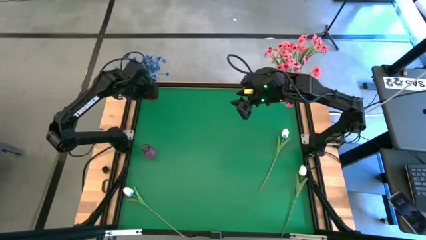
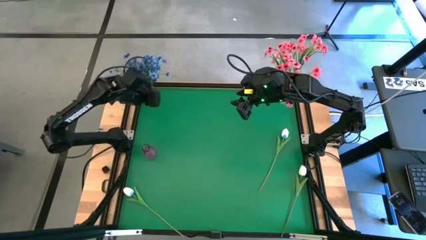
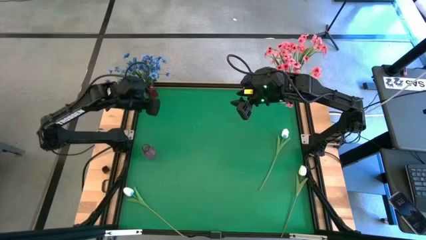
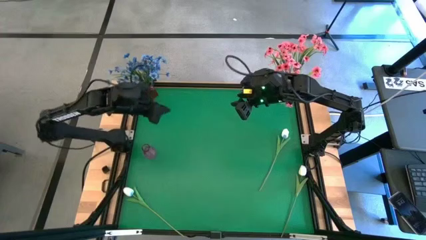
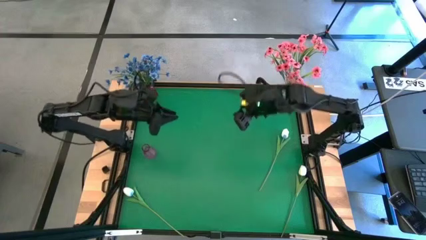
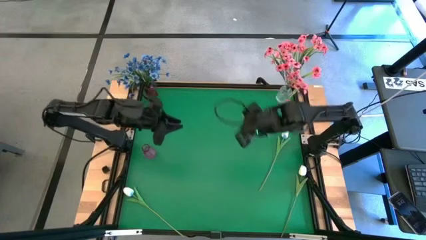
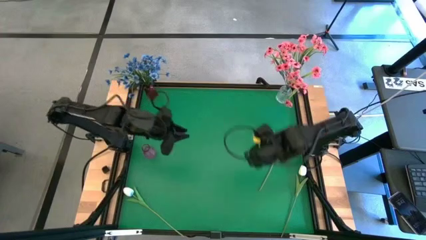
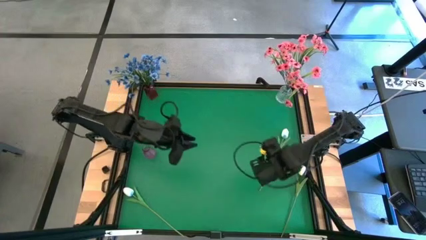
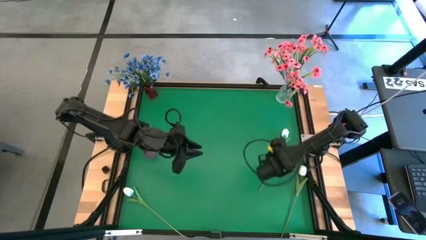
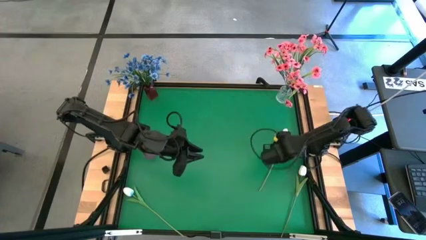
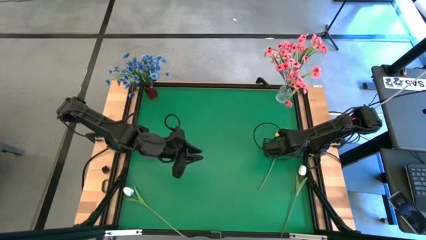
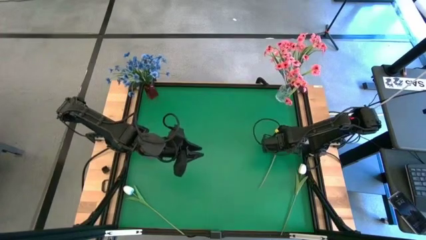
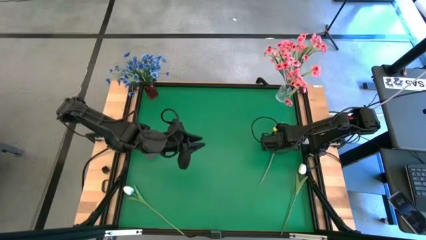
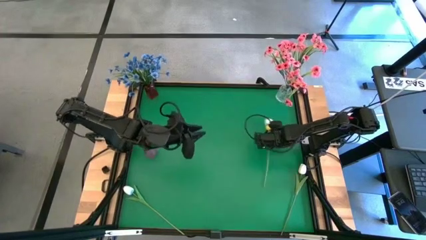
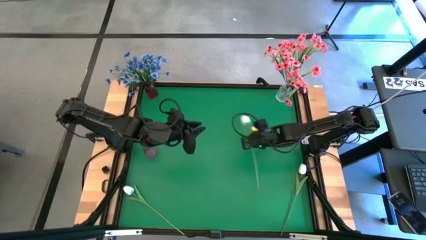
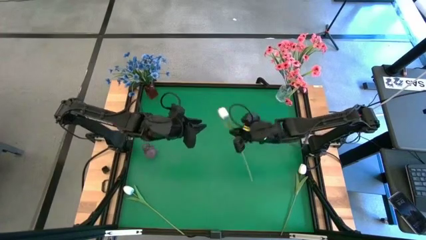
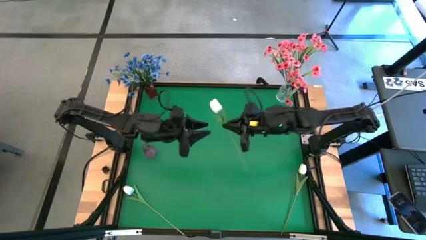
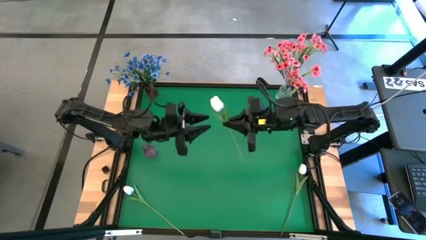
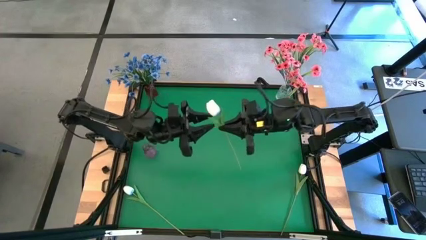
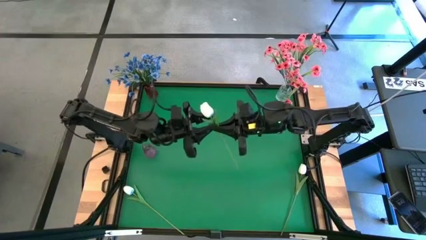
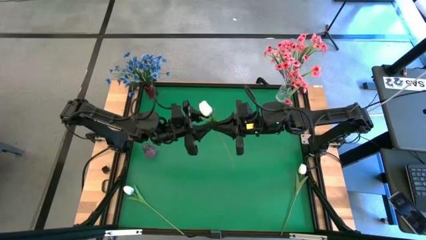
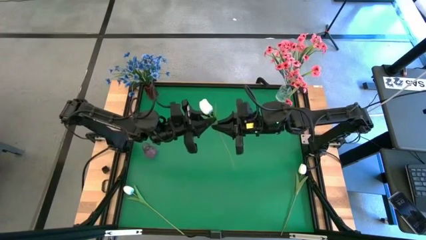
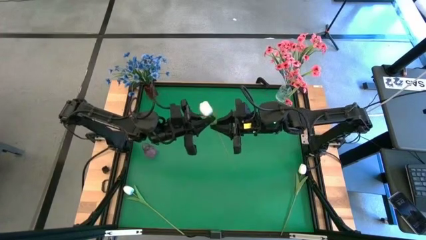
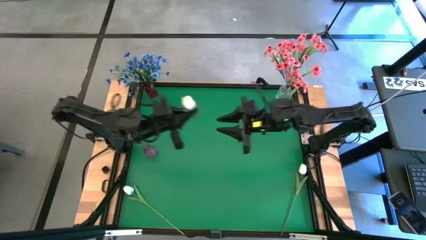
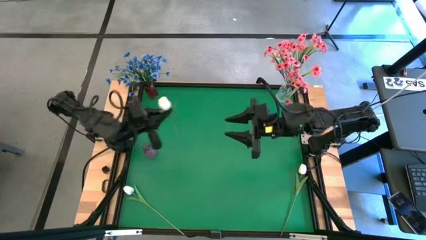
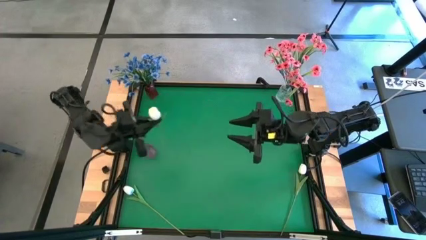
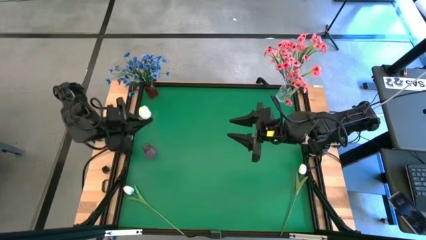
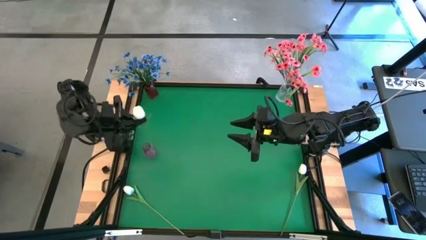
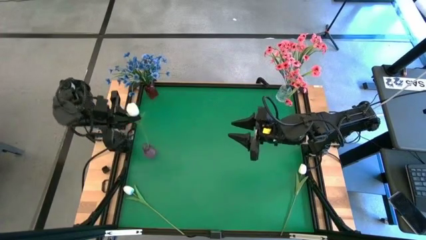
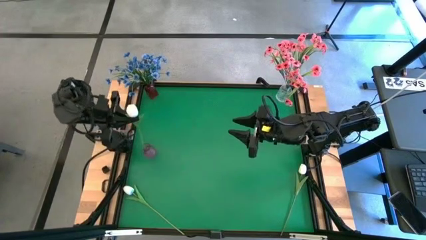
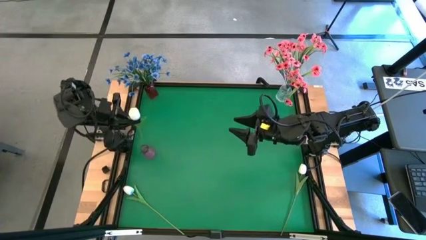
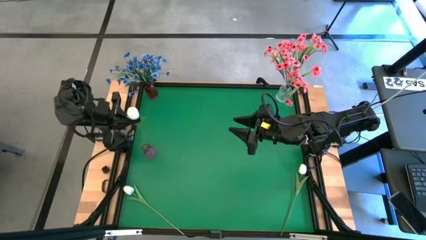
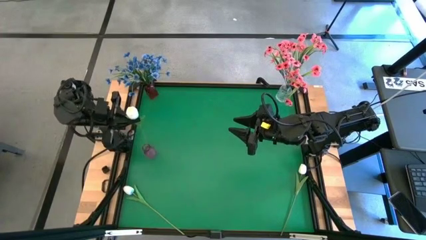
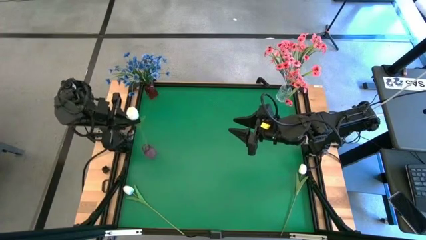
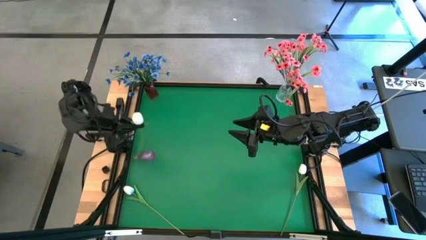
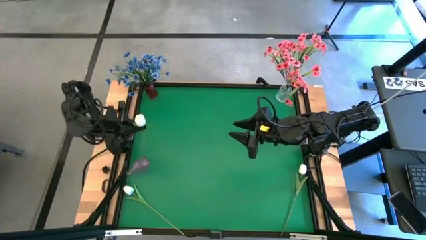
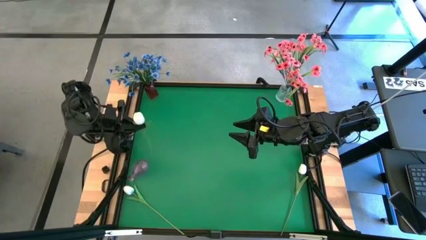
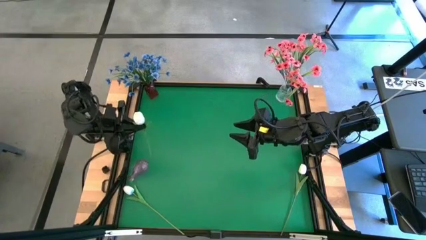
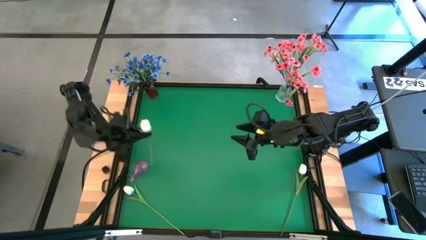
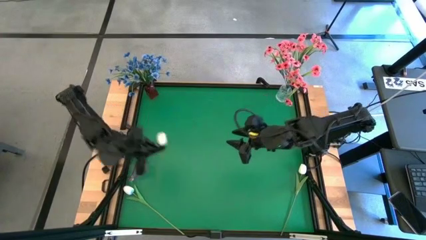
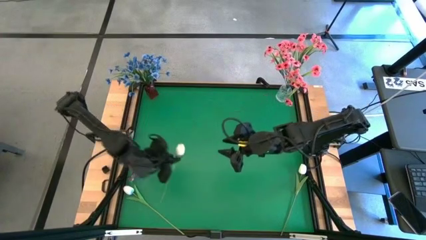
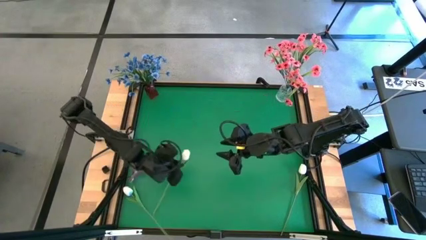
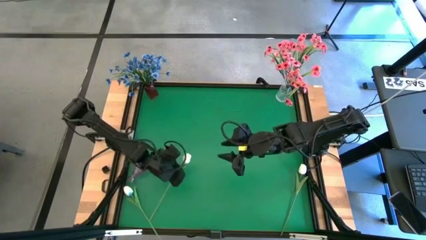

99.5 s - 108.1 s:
Task: Sort flowers into vase by color
Put the top white tulip into the purple vase

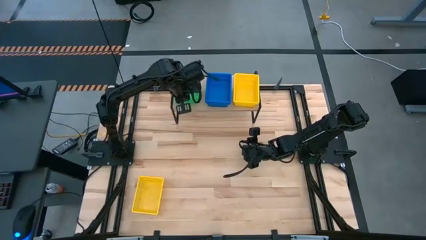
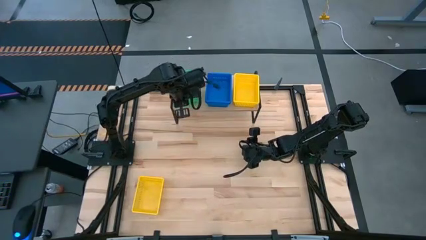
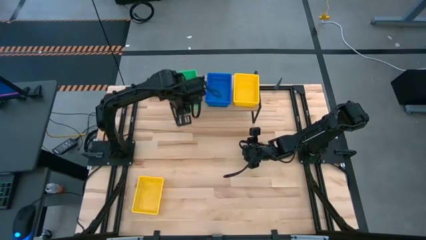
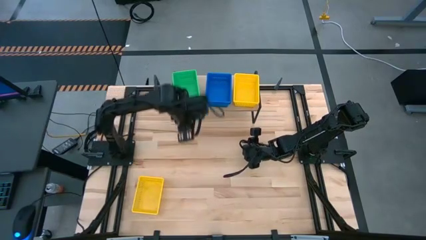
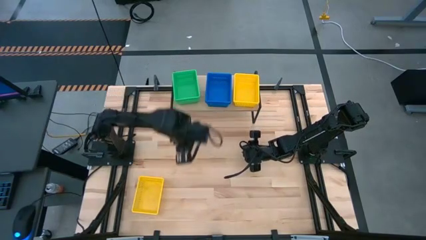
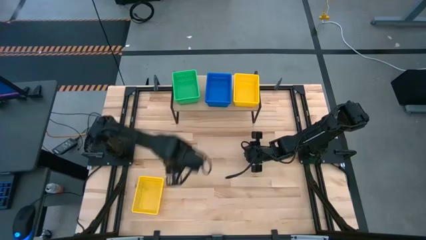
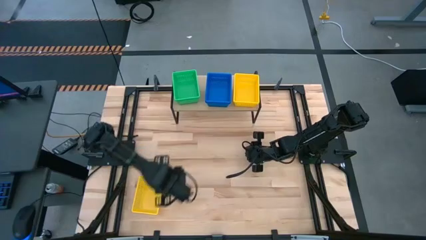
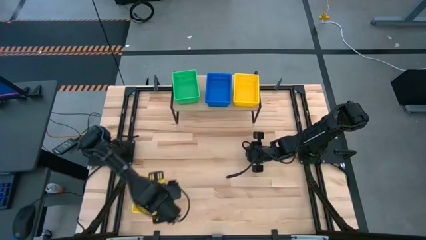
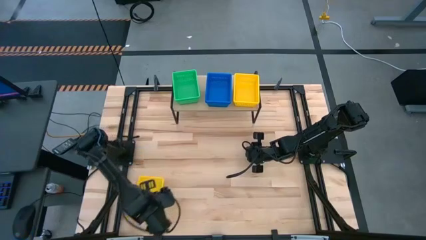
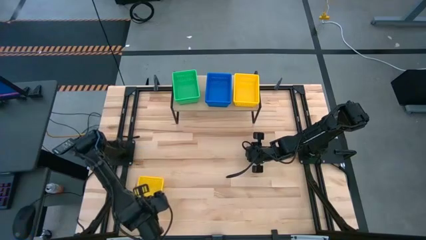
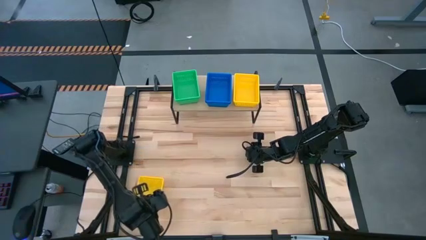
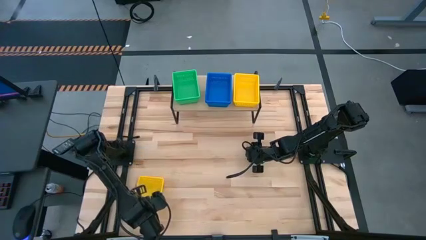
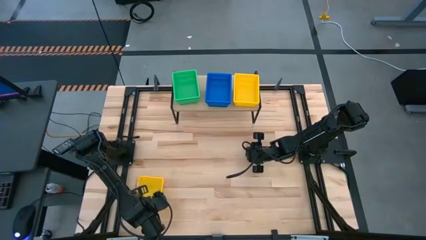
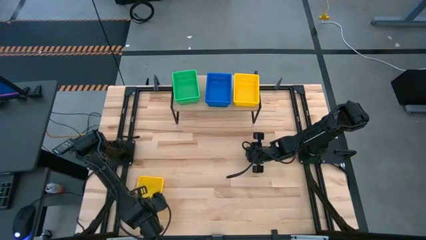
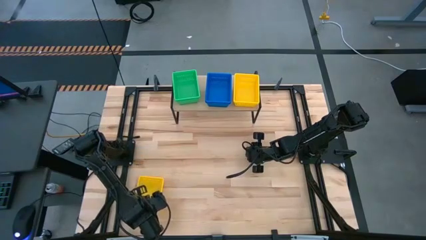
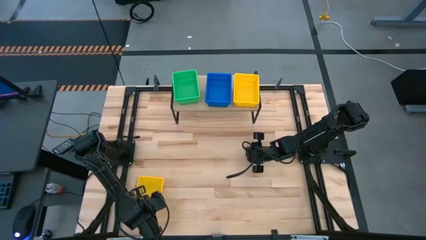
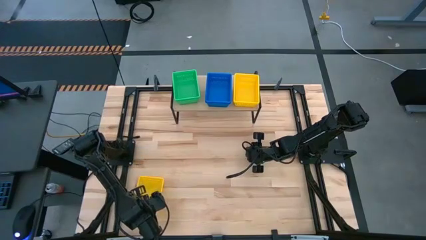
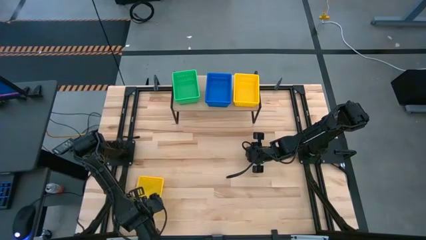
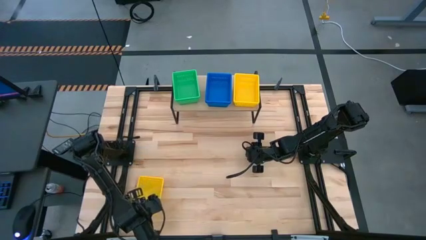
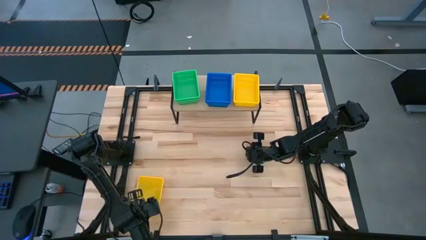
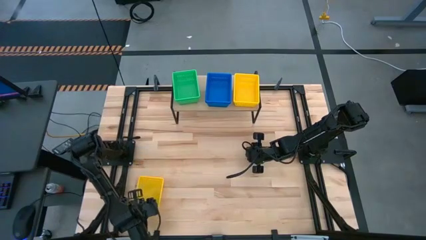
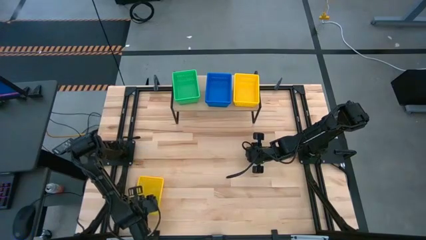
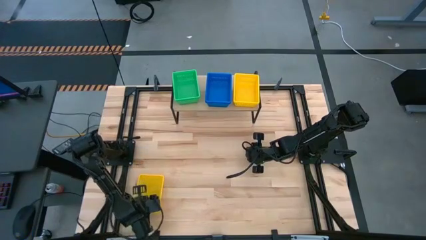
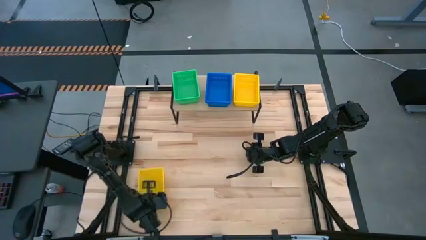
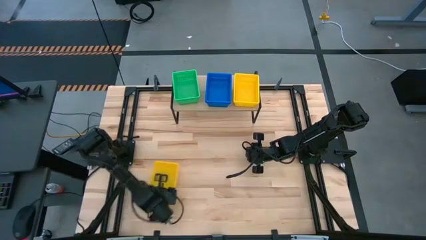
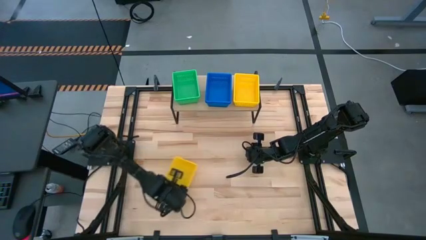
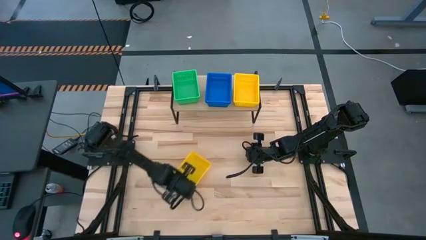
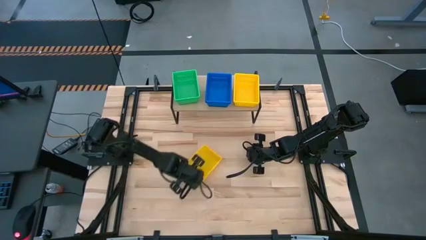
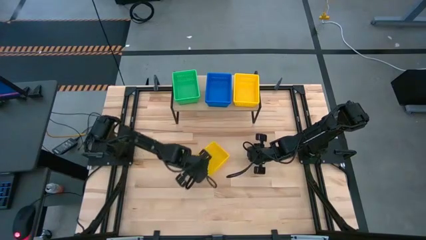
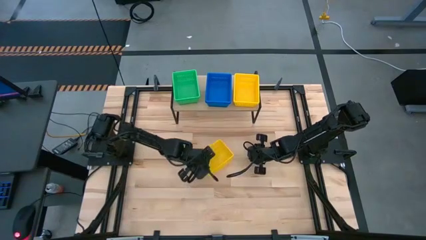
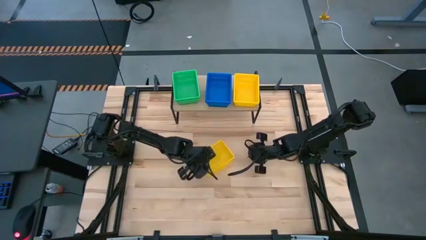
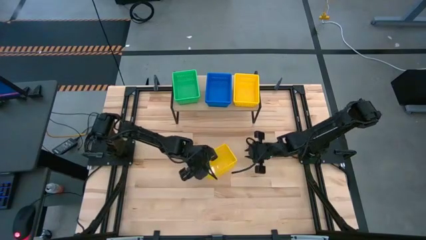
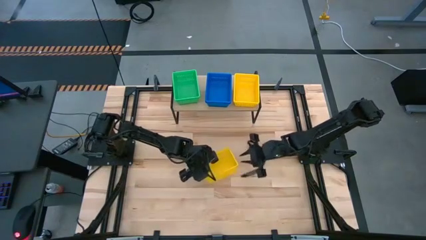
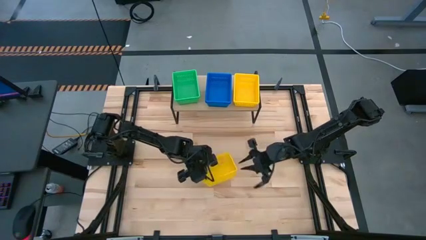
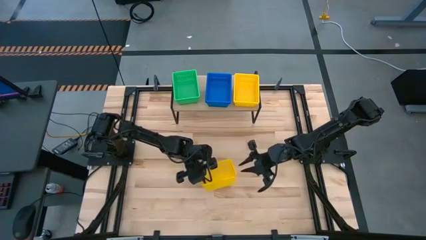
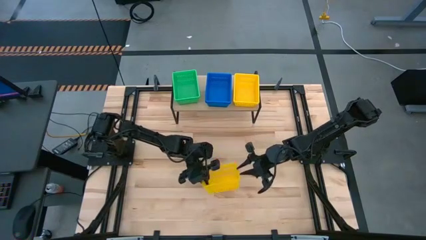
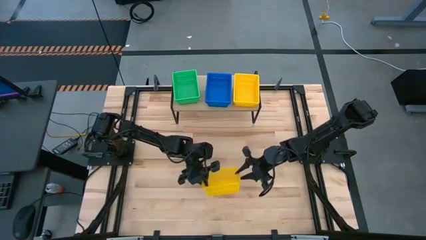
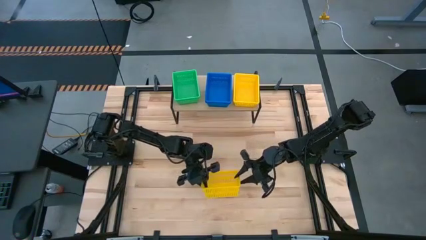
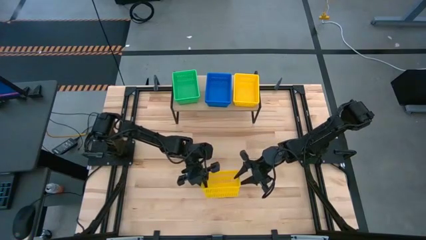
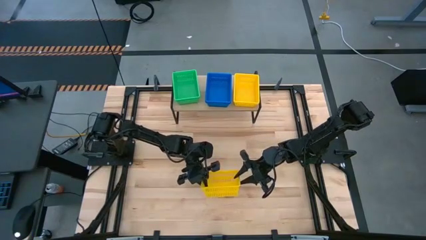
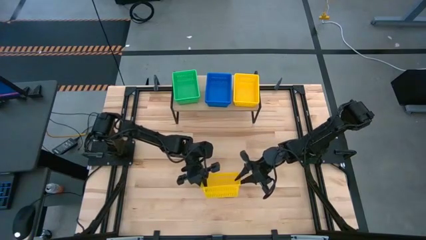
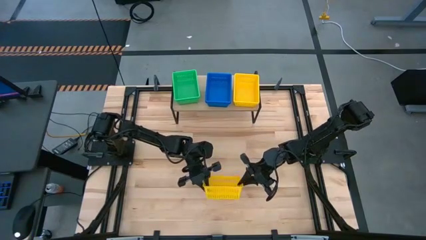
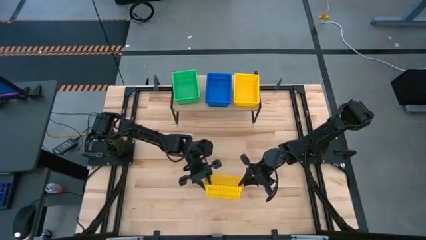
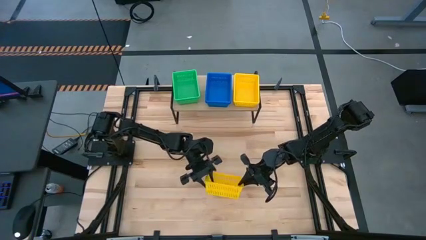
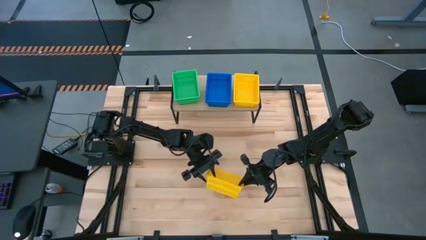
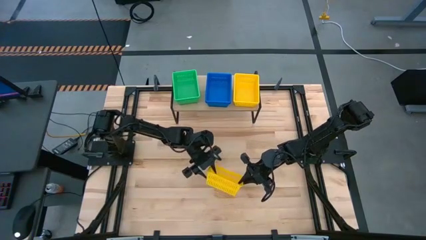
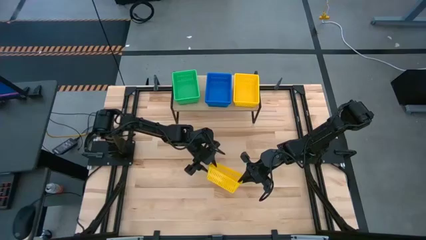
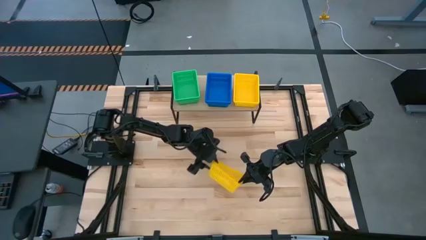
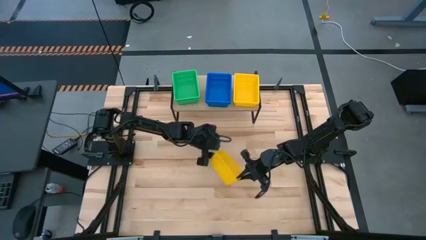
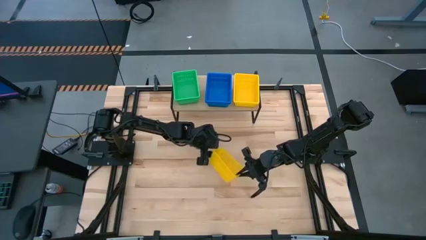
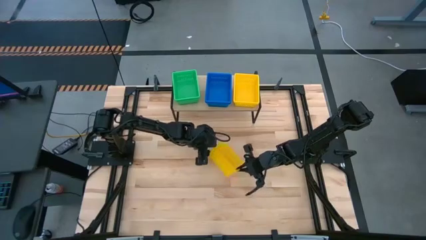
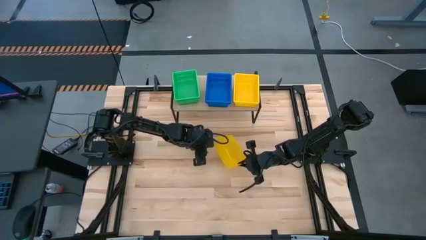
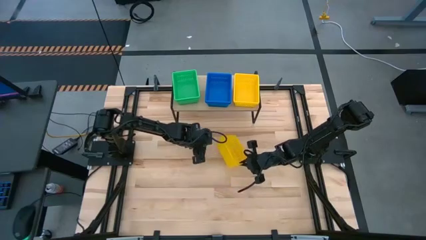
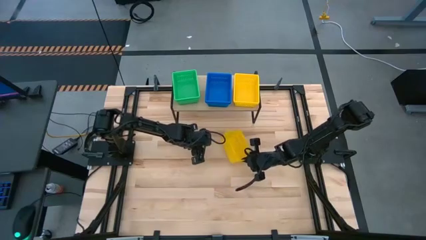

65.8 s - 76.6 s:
Task: Stack baskets on shelf by color
Stack the yellow bin on top of the yellow bin on the shelf
